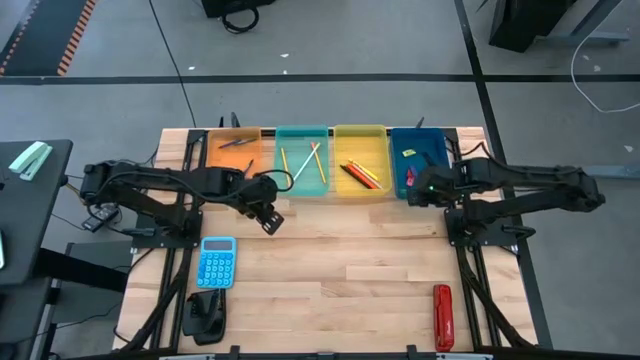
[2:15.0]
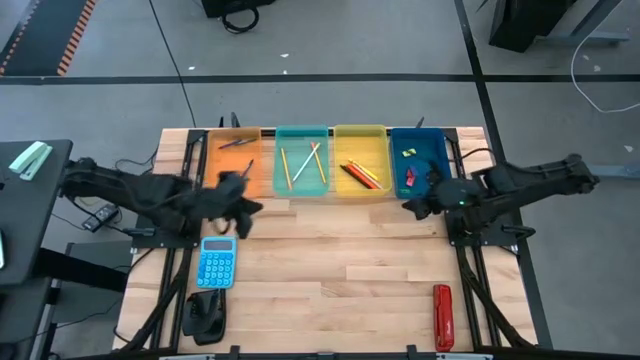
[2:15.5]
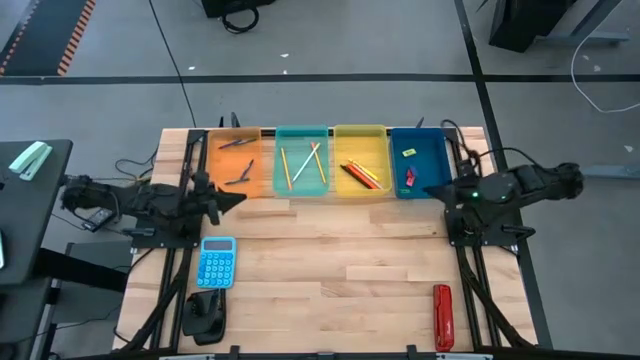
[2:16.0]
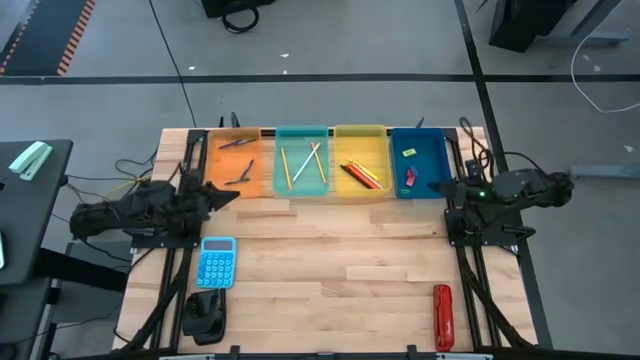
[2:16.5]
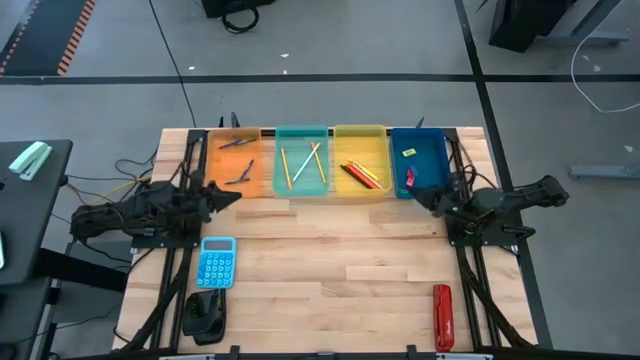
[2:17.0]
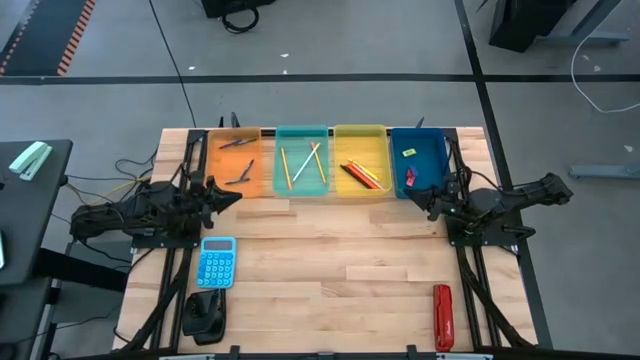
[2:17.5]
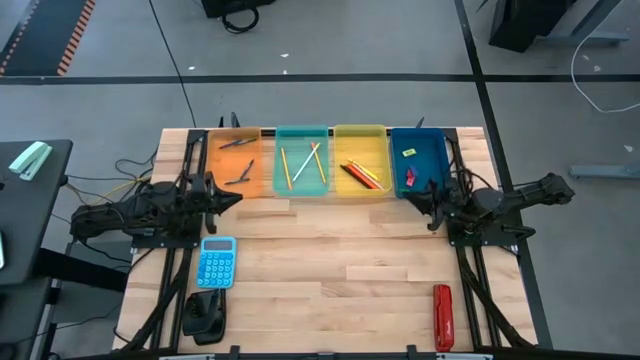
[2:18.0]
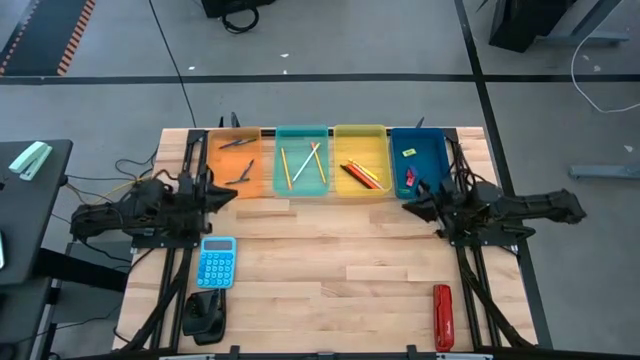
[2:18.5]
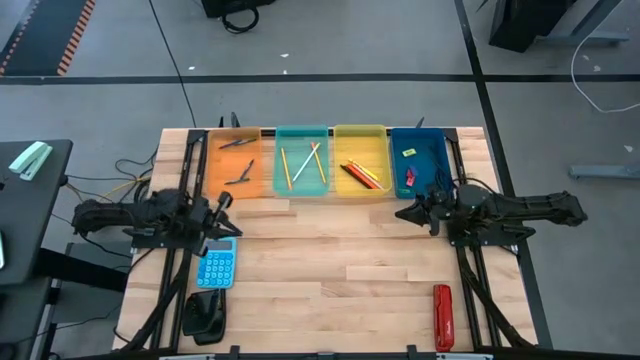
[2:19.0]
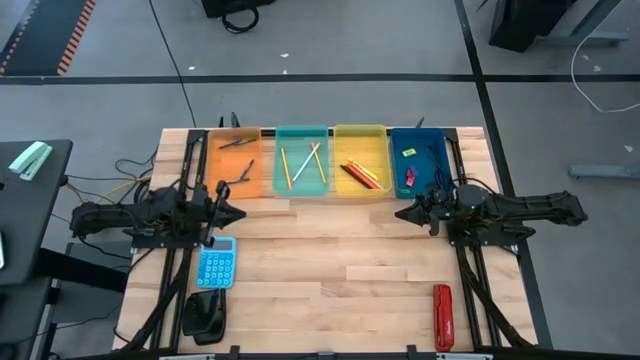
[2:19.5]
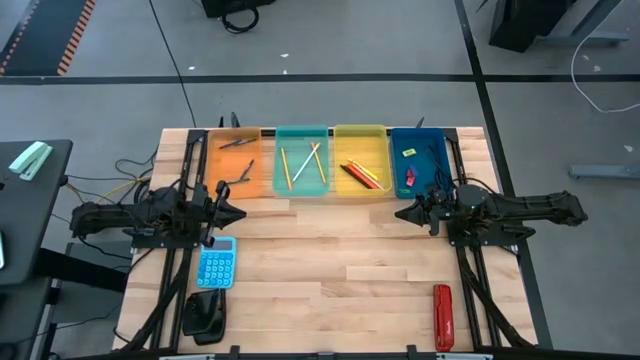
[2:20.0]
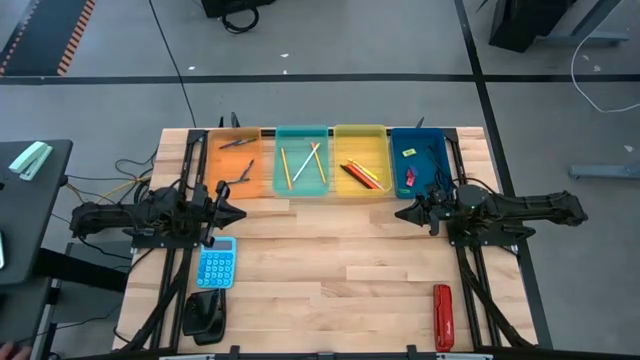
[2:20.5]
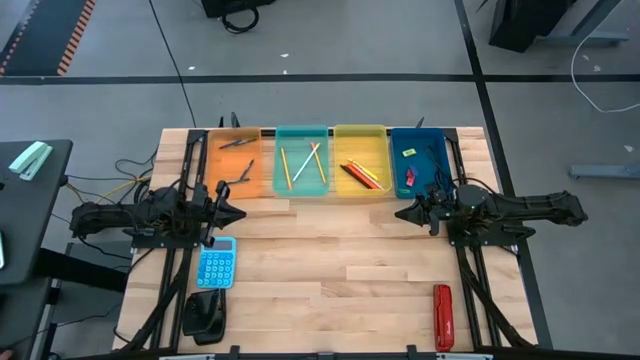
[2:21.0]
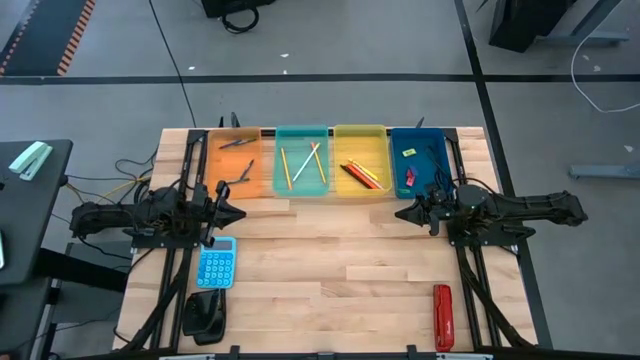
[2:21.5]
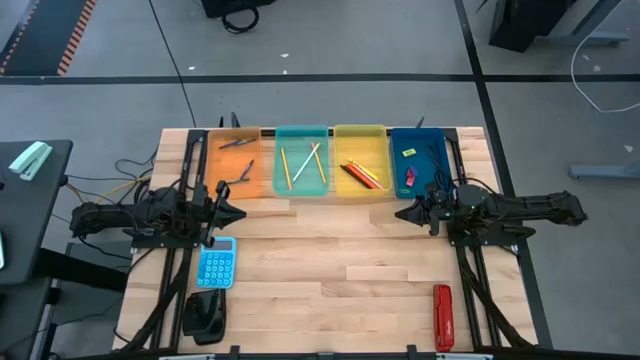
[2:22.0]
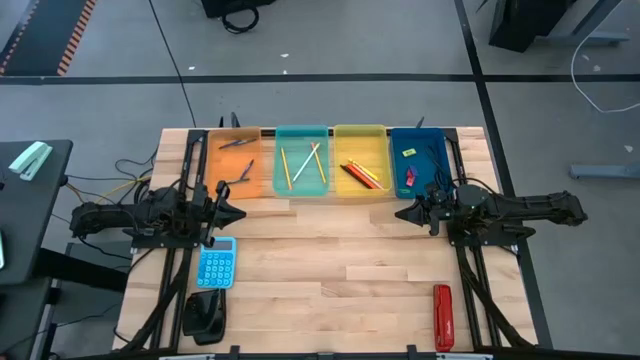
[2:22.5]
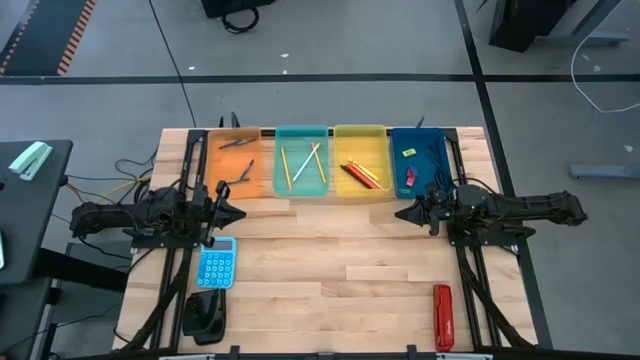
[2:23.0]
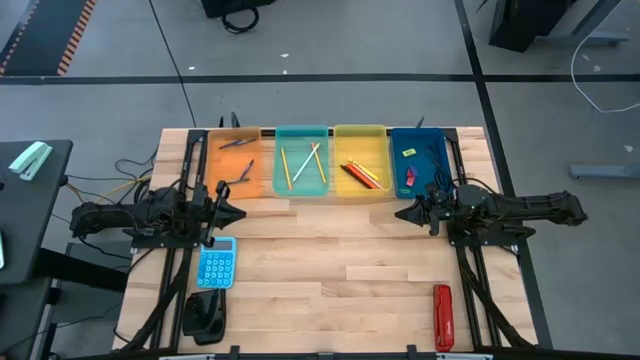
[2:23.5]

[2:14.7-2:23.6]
Task: Sort crayons/erasers/pens/pencils in bins
Return to Home Position

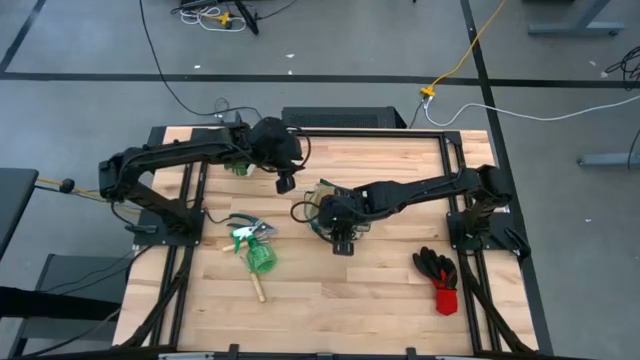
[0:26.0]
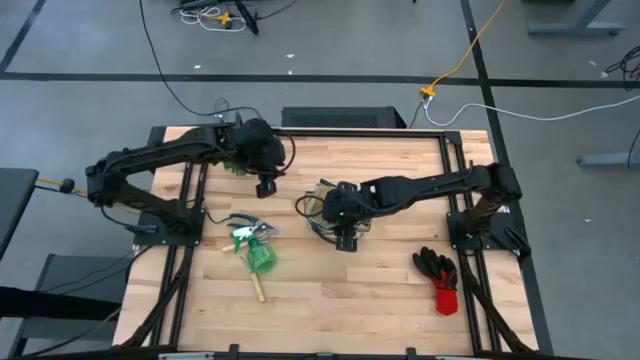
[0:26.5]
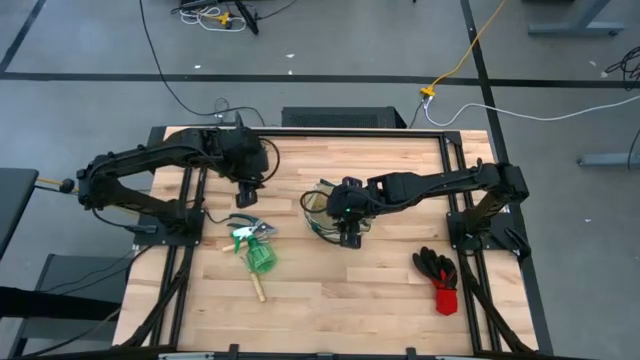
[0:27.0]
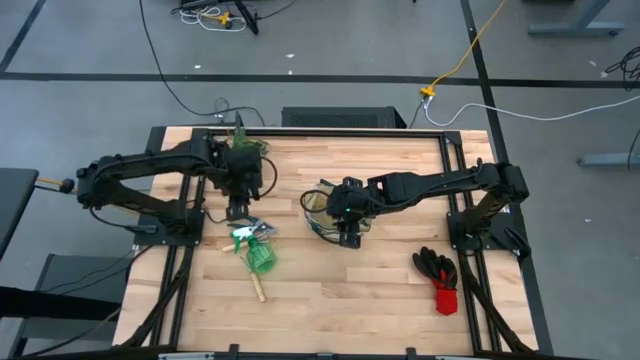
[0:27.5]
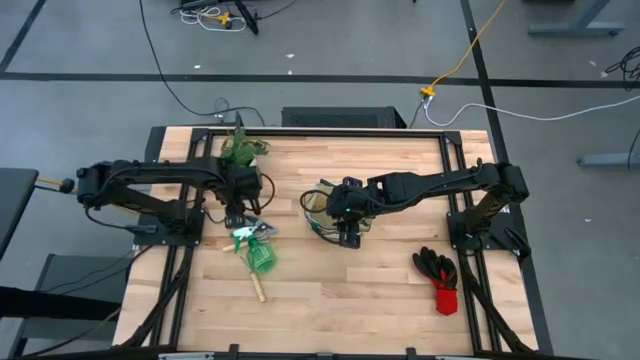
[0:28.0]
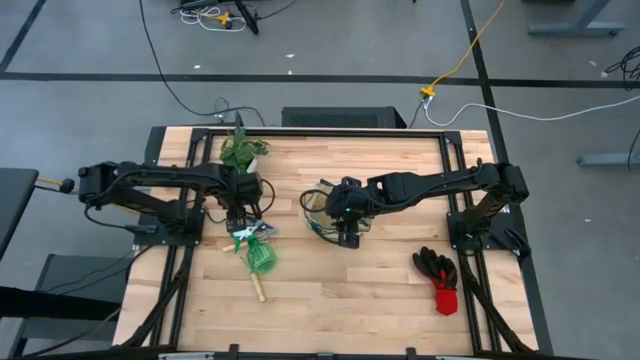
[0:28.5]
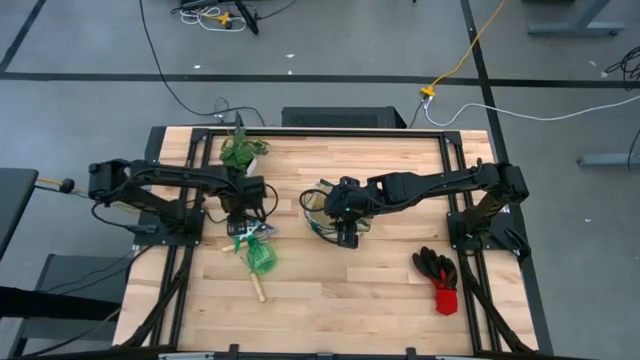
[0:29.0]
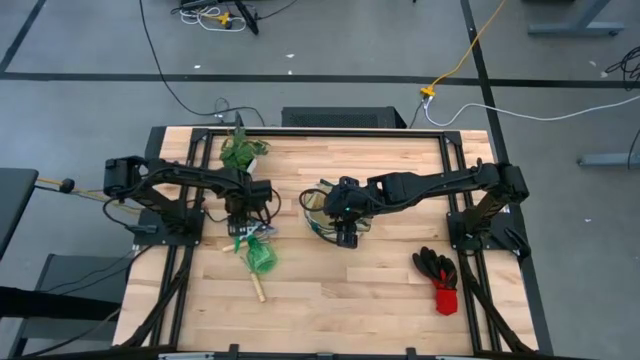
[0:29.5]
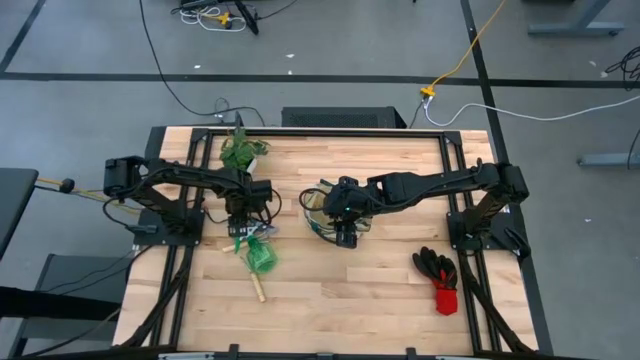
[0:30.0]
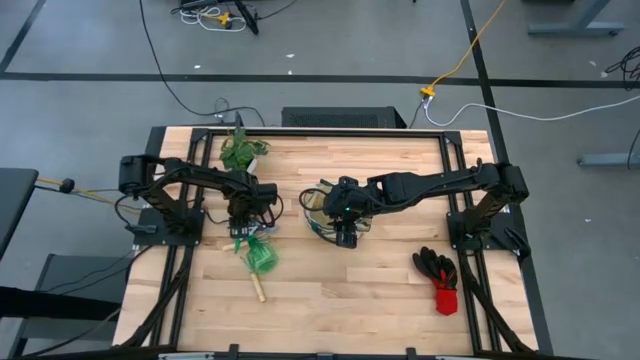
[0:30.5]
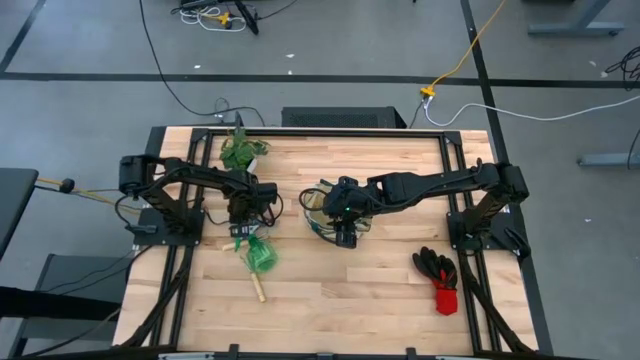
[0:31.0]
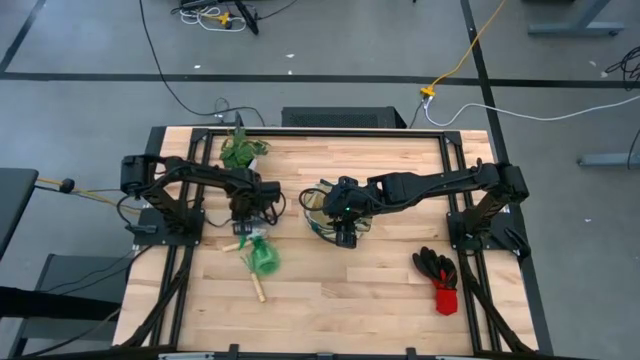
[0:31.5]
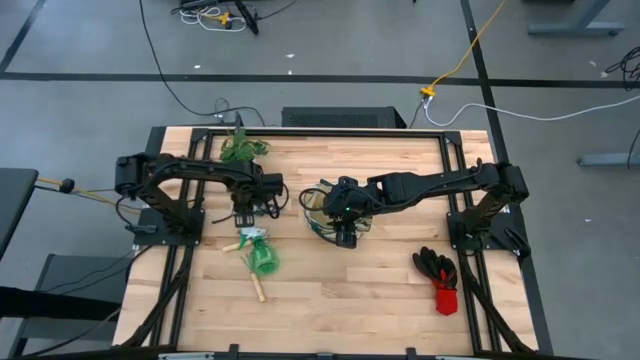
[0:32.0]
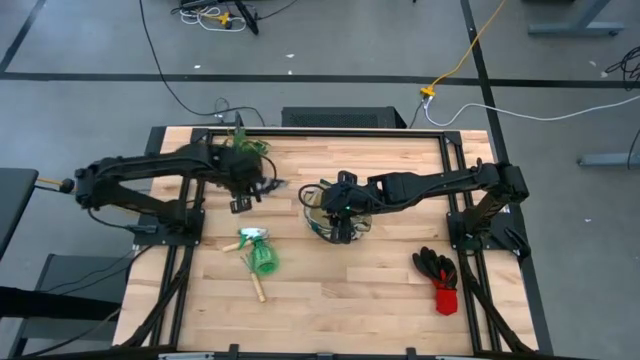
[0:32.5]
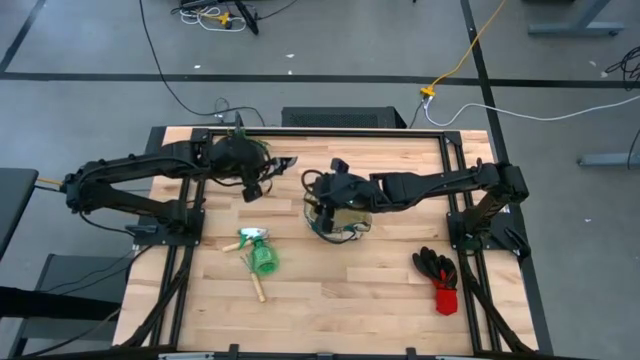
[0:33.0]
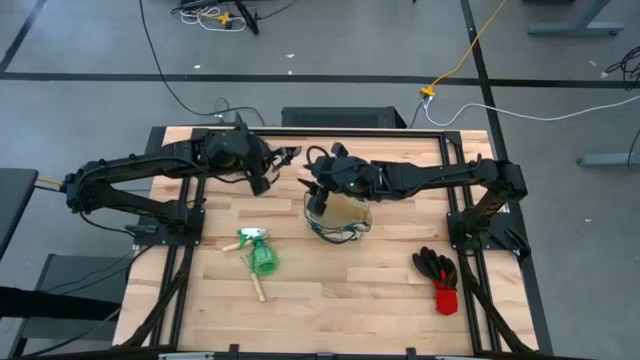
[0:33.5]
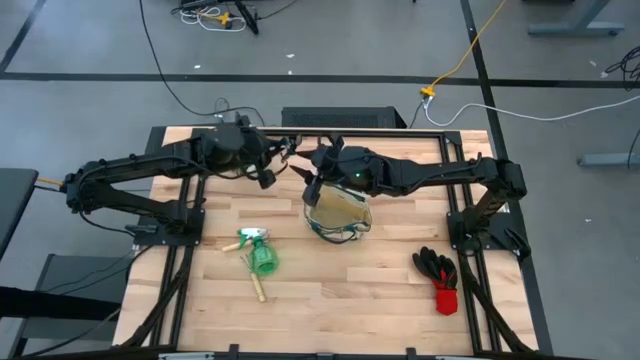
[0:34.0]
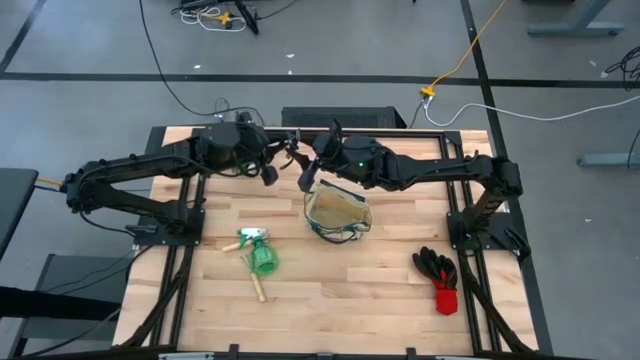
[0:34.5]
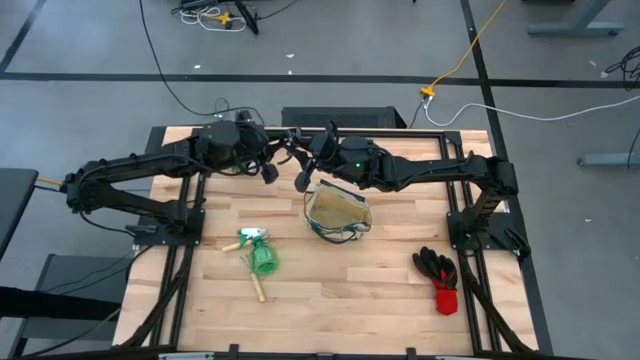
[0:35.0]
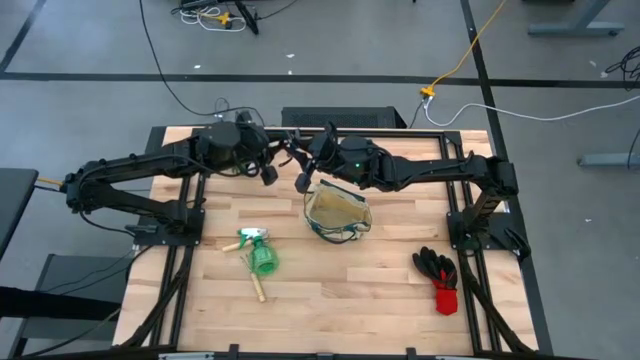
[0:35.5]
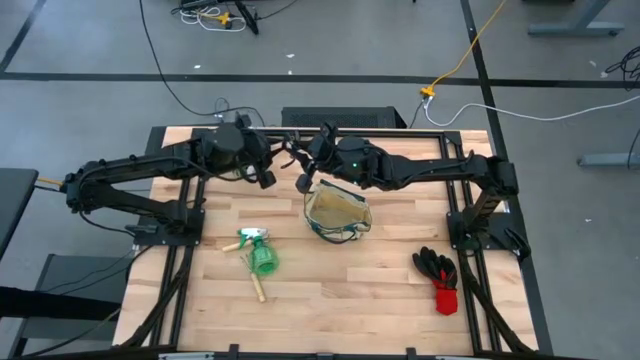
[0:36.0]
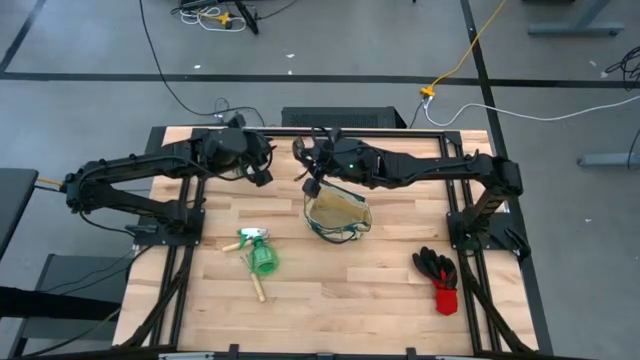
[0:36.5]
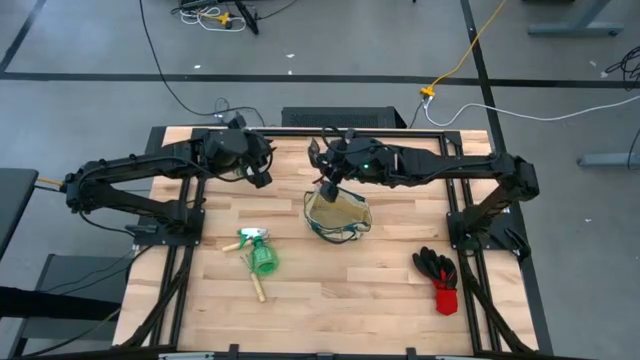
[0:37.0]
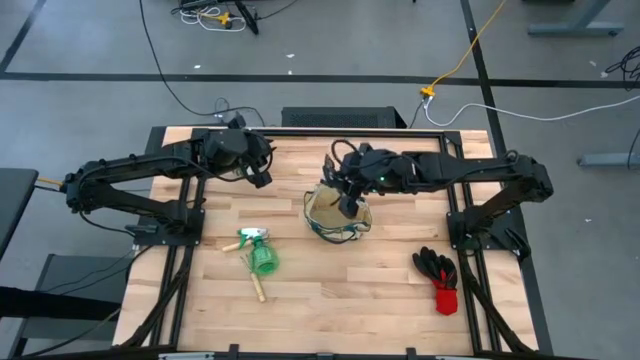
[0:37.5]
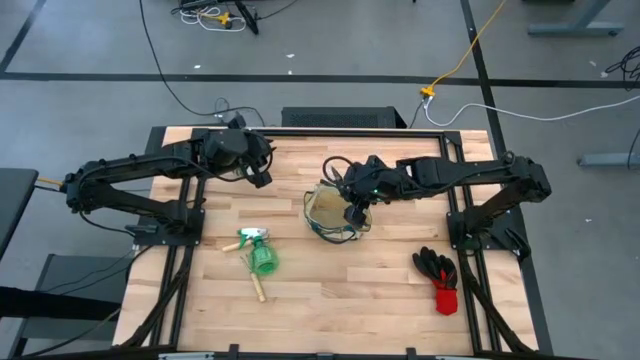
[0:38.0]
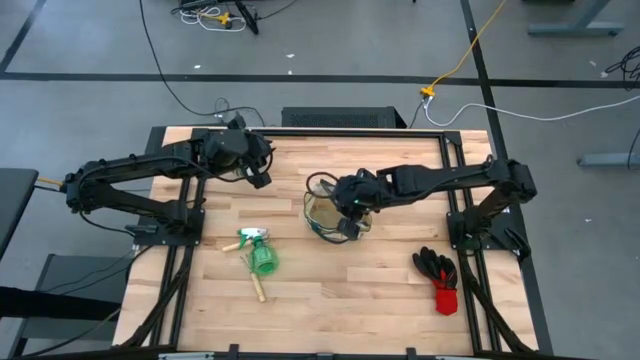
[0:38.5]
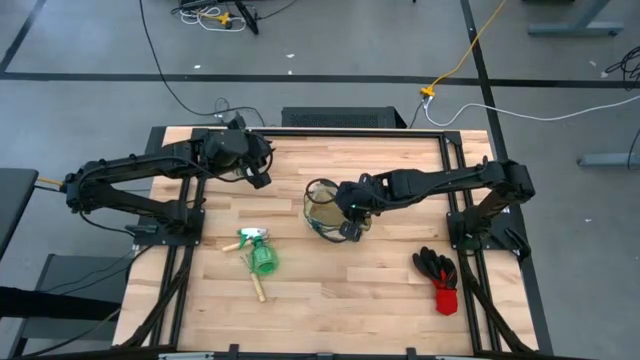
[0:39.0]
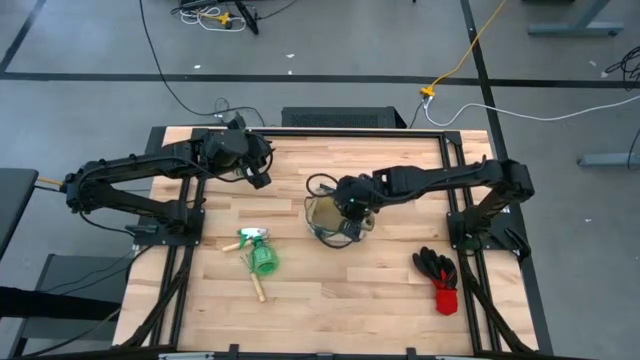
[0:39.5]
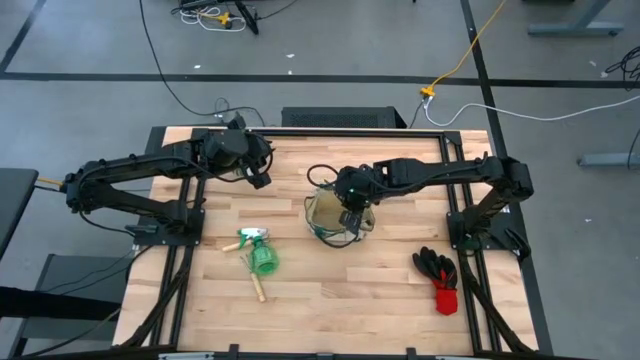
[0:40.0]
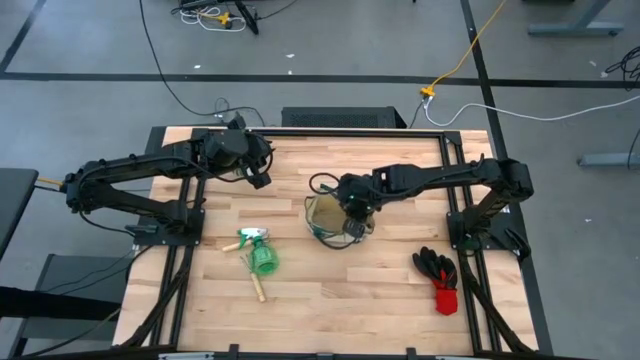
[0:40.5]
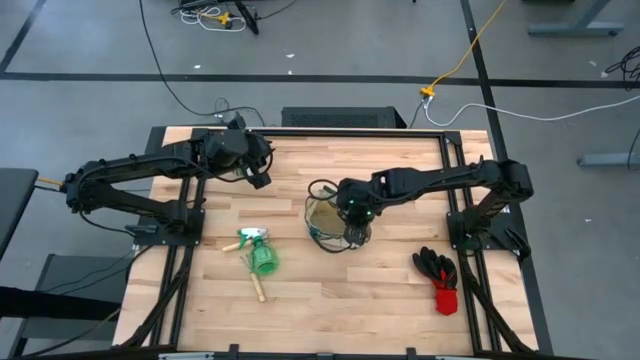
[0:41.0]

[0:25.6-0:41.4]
Task: Pick & Place Garden tools in Gardening bag
Put the green shear scissors into the white gardening bag
